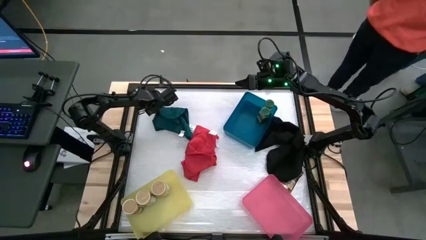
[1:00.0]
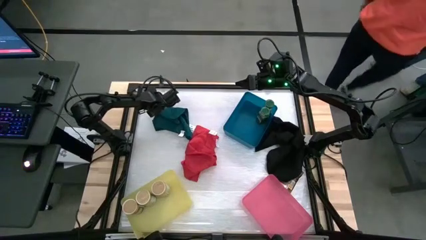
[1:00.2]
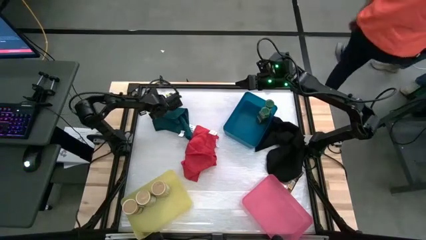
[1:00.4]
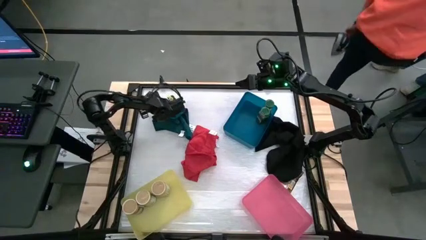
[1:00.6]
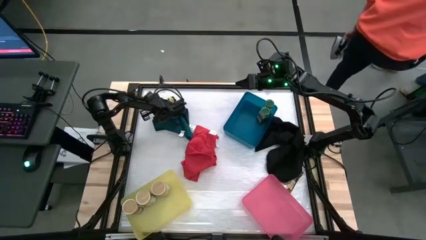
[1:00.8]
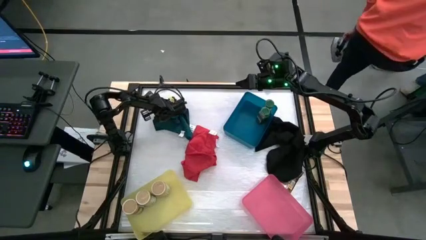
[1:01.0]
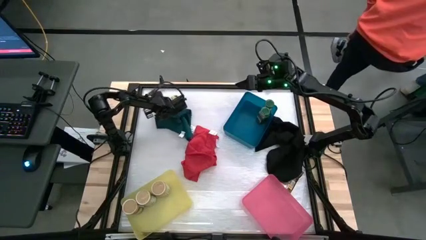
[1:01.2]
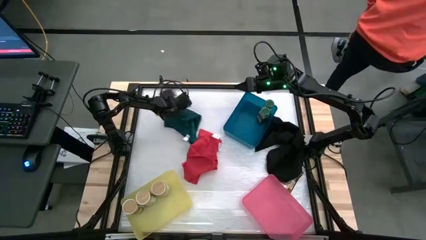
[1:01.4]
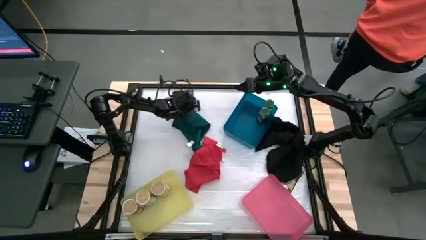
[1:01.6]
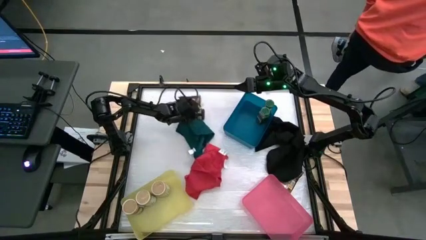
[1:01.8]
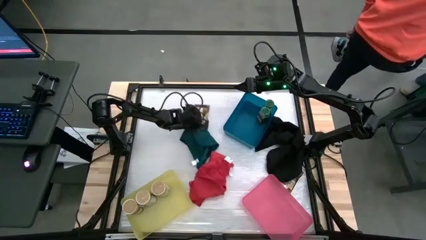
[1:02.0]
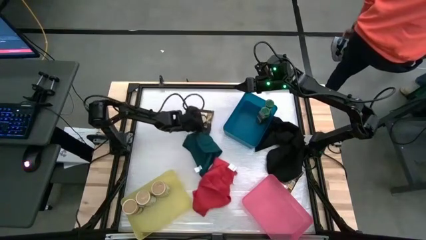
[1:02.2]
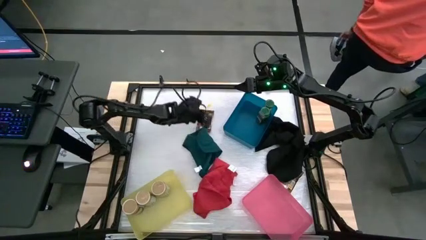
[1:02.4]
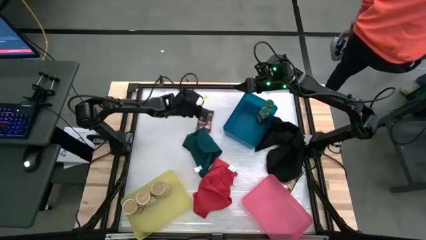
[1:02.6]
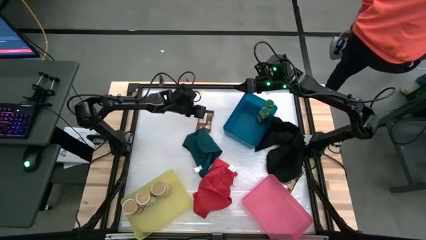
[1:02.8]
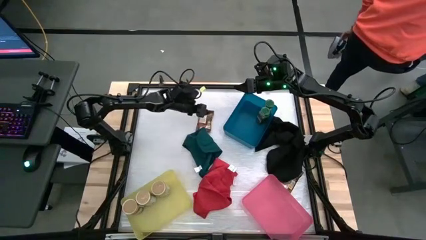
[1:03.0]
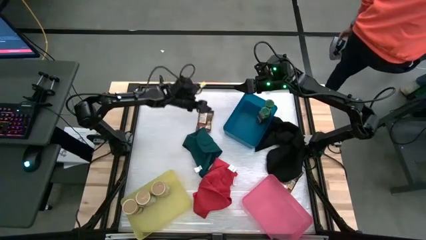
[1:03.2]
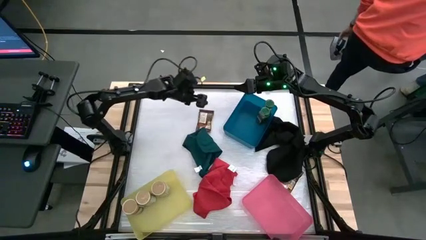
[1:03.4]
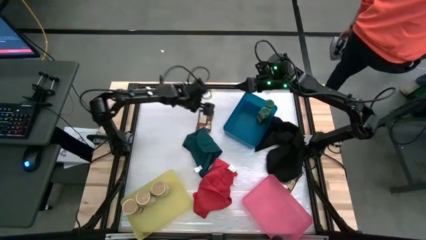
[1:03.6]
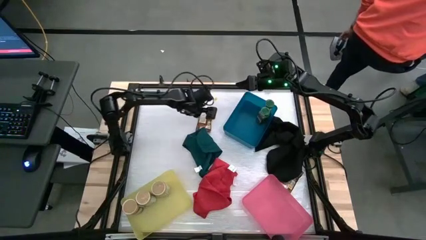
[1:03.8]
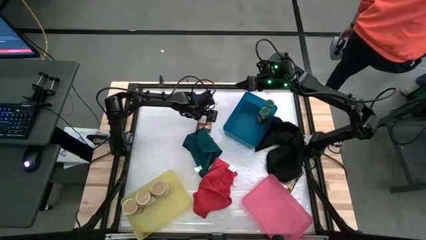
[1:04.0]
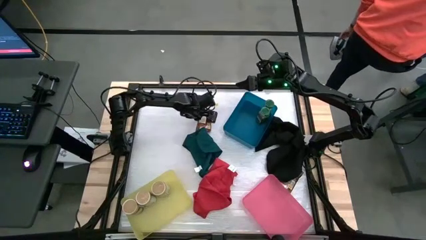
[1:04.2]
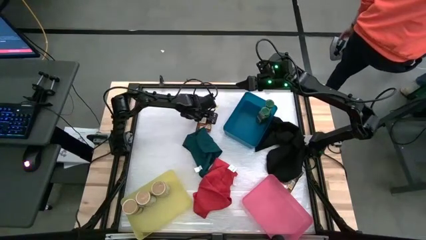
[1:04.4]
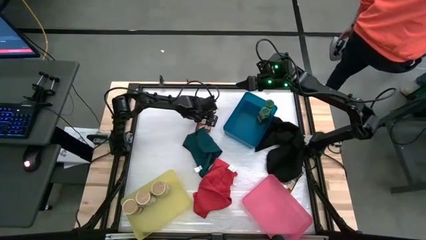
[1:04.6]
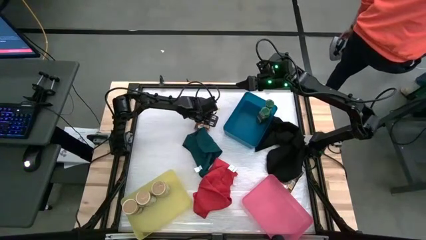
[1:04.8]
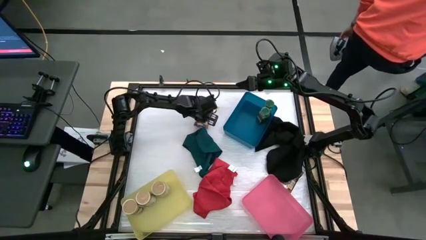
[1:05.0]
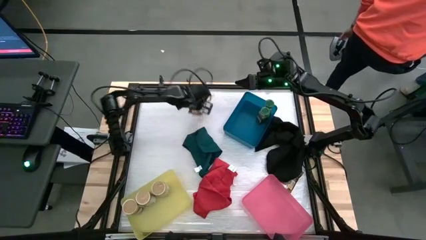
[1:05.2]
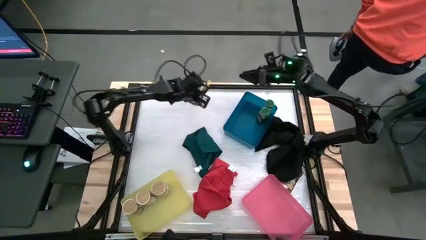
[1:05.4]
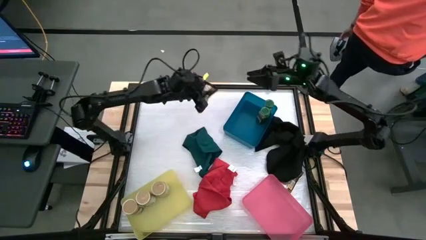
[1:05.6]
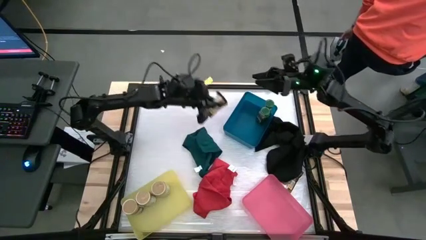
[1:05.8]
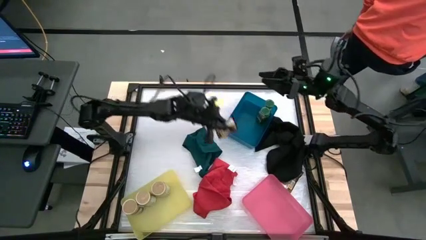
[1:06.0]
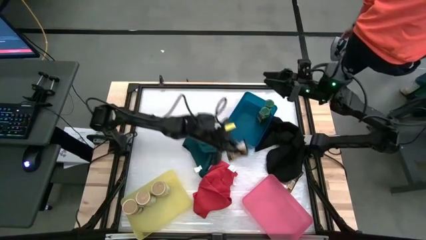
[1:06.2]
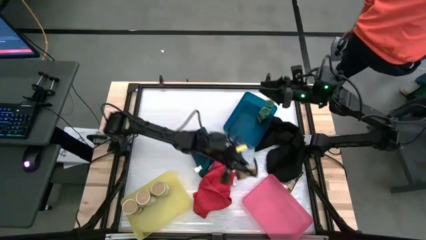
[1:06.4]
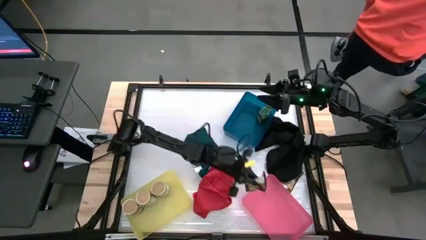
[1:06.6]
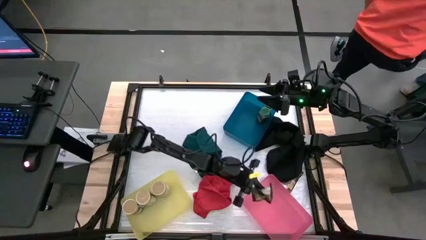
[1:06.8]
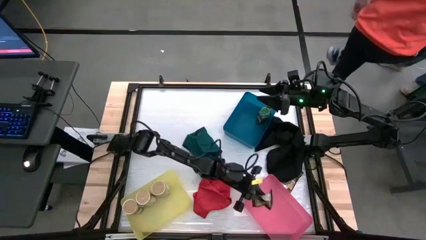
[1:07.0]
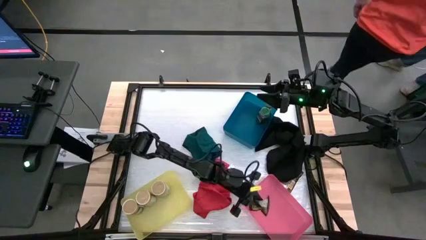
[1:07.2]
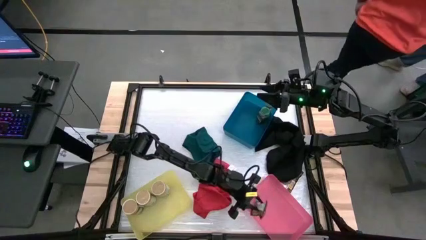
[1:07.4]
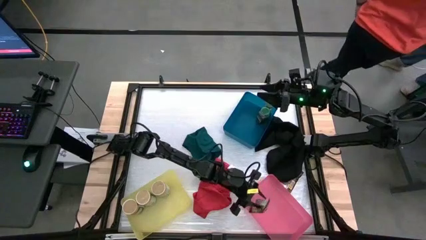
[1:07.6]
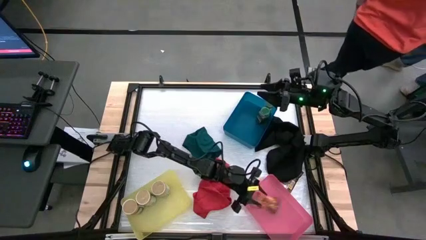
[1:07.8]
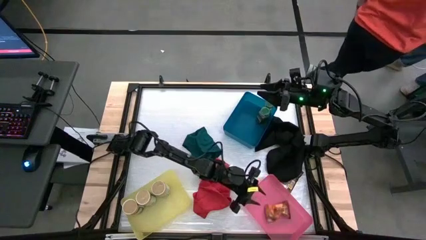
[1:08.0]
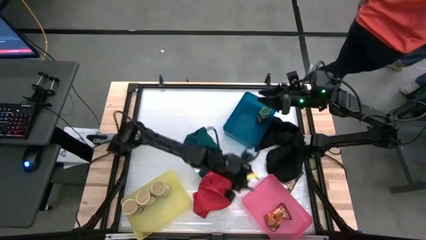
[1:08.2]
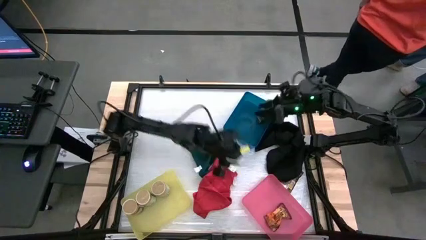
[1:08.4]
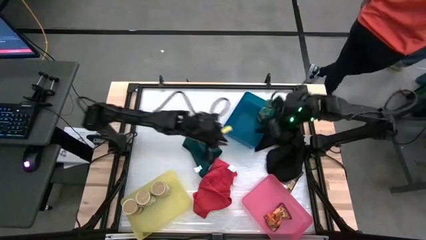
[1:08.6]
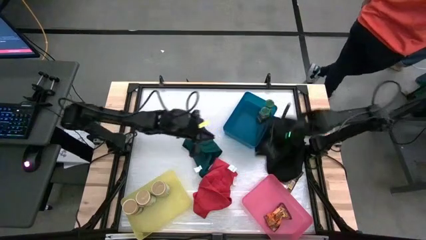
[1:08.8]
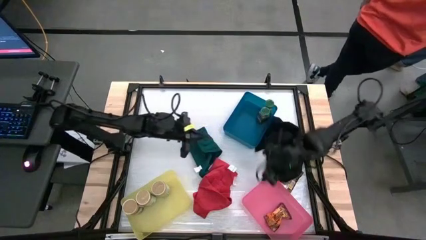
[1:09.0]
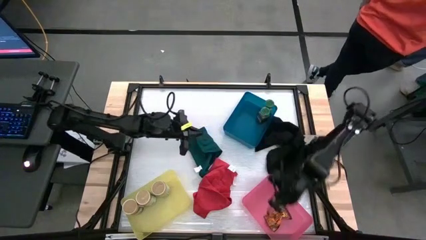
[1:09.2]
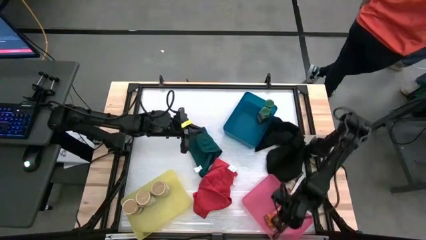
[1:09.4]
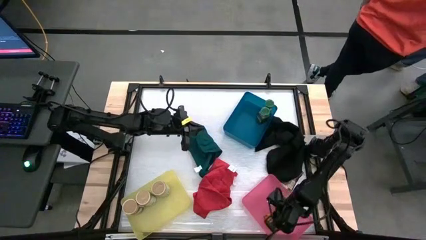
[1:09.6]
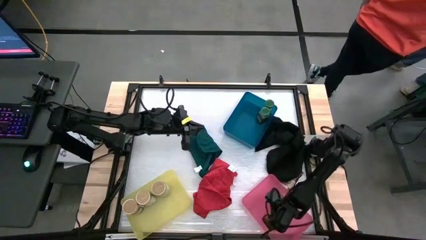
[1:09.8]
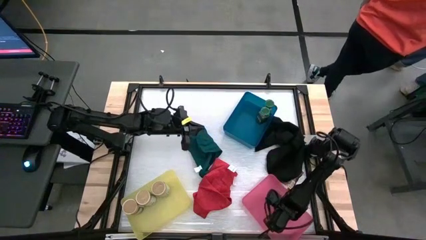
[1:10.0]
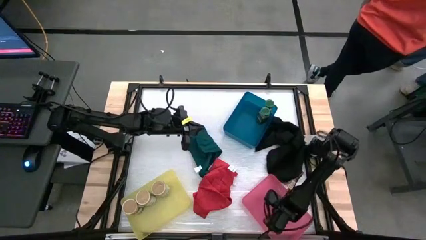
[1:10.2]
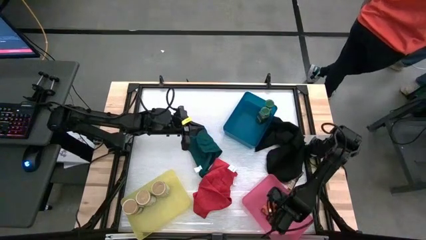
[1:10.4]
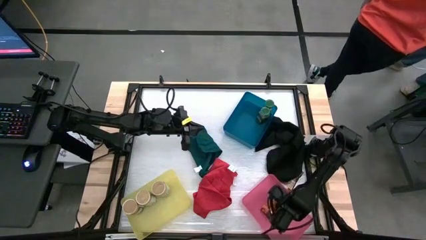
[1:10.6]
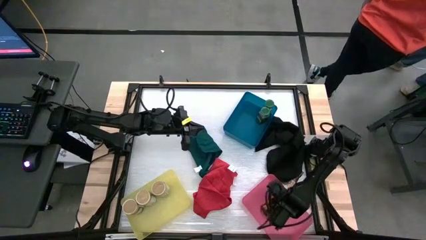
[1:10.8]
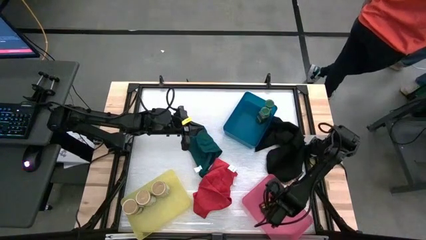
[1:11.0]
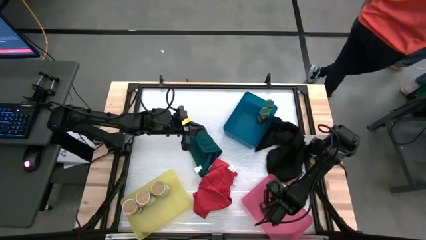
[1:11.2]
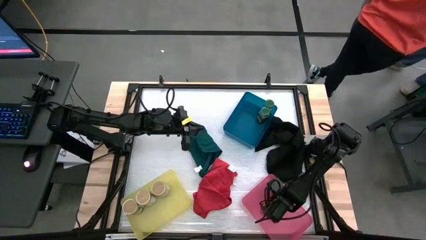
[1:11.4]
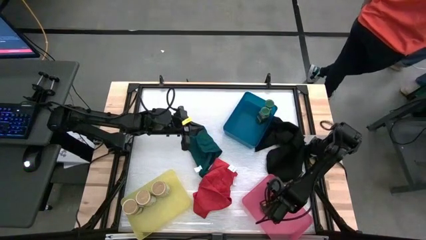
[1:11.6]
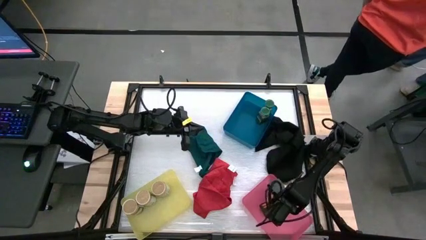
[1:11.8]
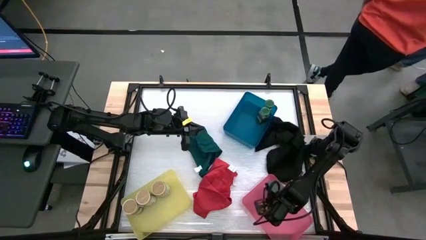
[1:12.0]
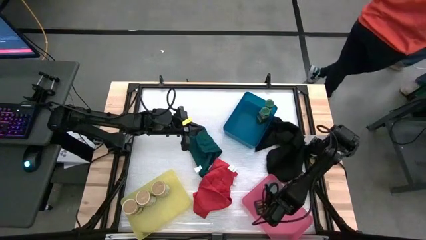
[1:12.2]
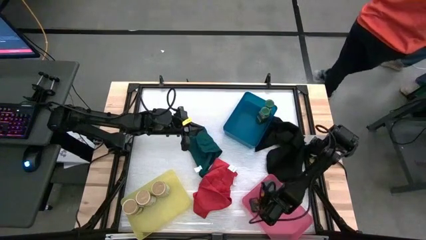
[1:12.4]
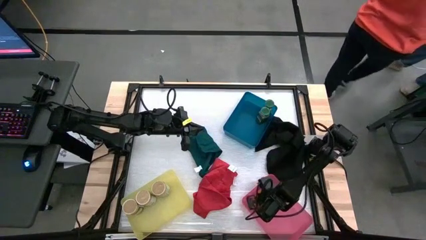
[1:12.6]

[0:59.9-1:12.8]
Task: Sort spices by type
Put the top orange seasoning bag into the pink bin

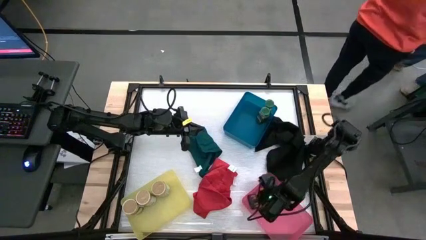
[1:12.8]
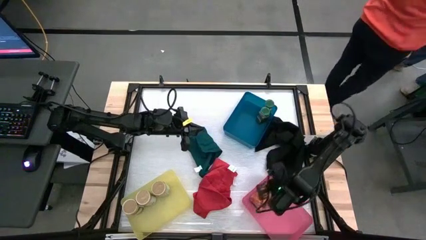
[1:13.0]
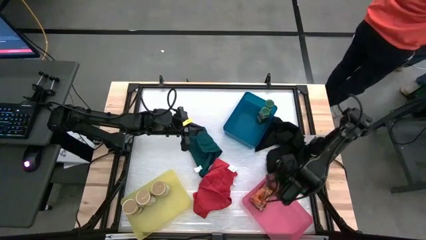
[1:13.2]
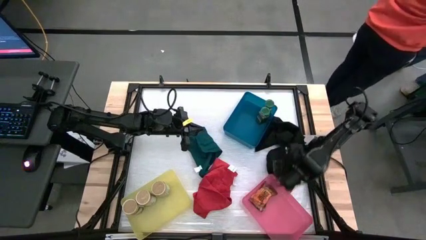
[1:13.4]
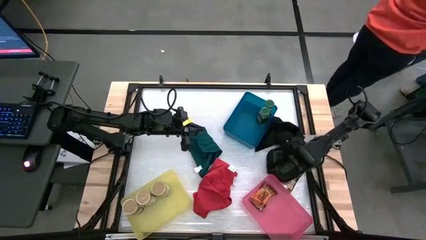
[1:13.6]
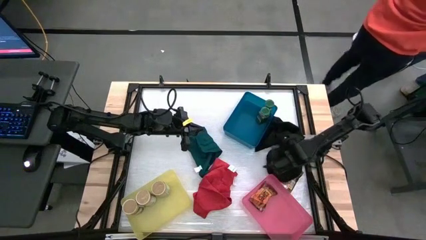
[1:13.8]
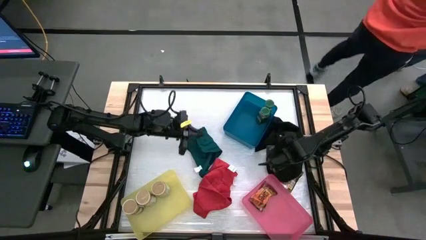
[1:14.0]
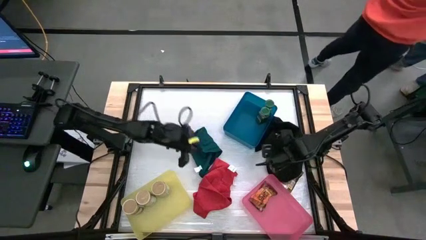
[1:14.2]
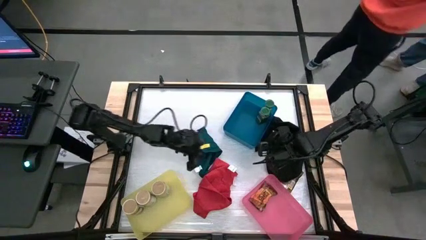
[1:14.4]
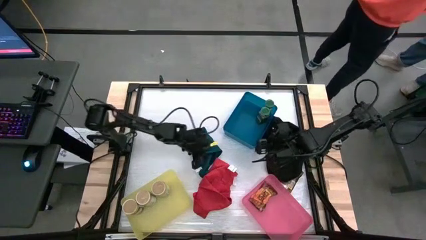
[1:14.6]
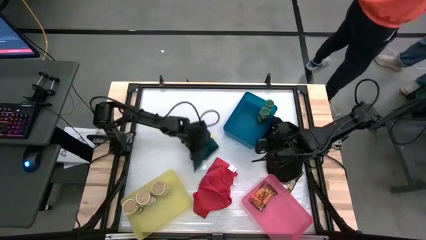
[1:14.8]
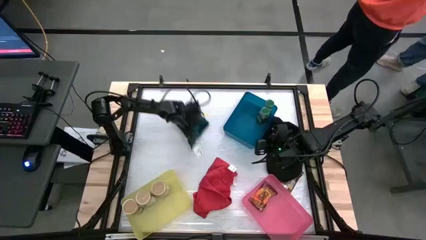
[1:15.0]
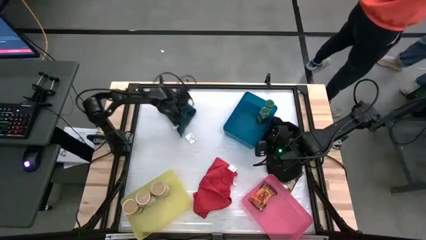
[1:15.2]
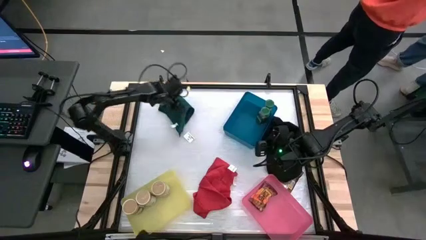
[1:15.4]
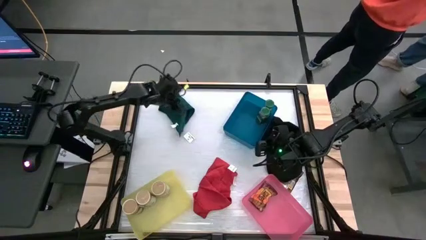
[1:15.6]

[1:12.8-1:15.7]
Move the green towel to the top left of the table

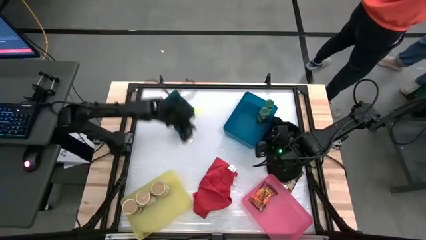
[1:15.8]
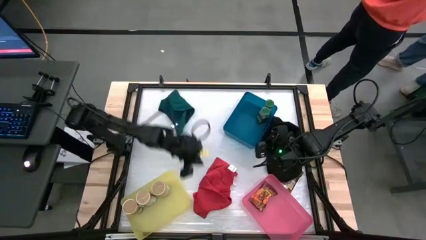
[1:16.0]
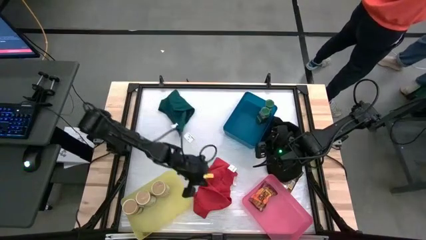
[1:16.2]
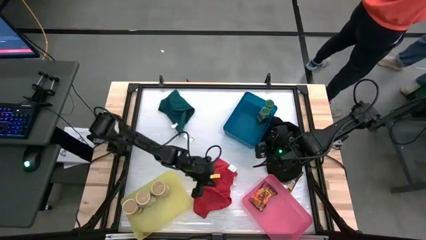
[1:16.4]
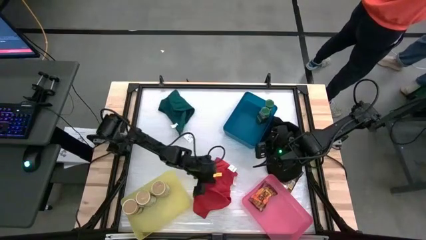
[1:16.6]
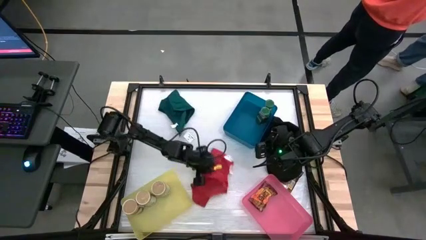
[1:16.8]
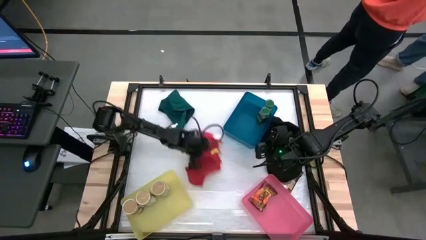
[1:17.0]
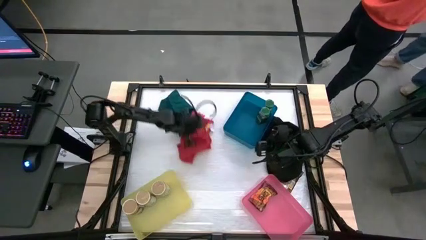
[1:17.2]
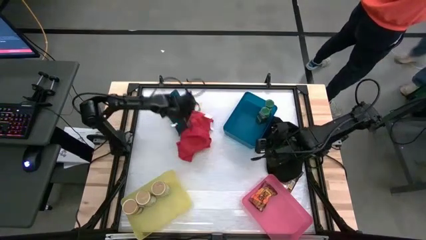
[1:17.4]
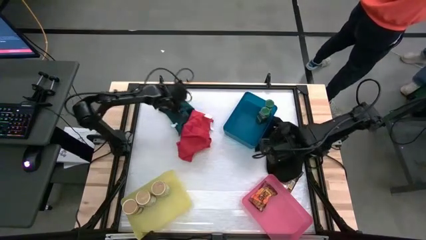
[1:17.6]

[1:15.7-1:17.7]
Move the red towel to the top left of the table
